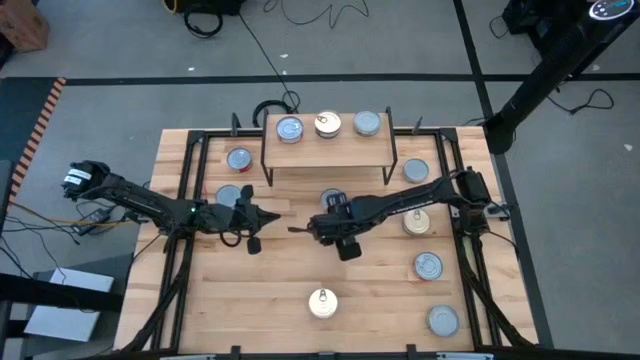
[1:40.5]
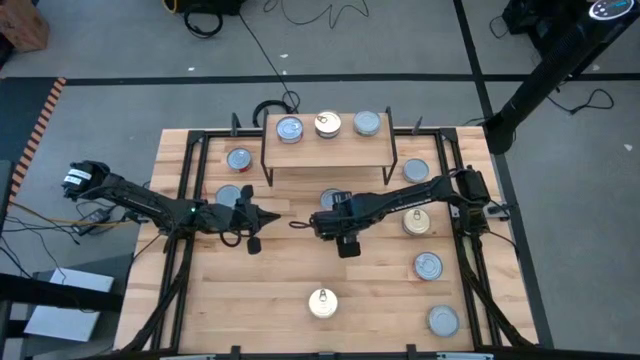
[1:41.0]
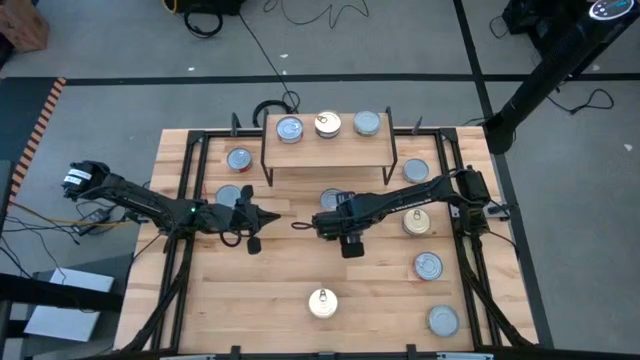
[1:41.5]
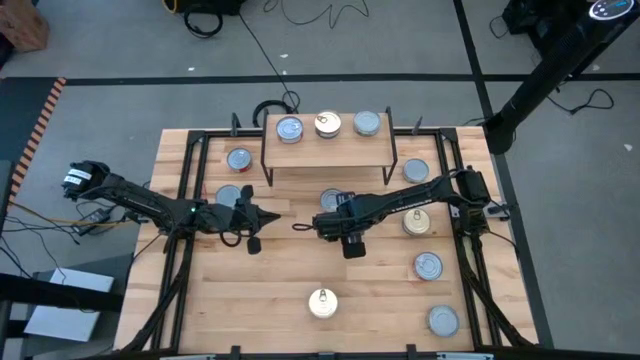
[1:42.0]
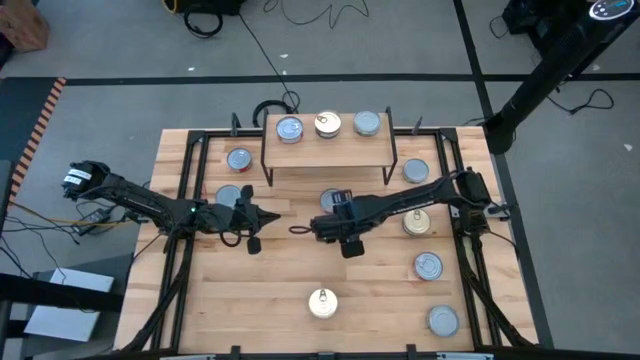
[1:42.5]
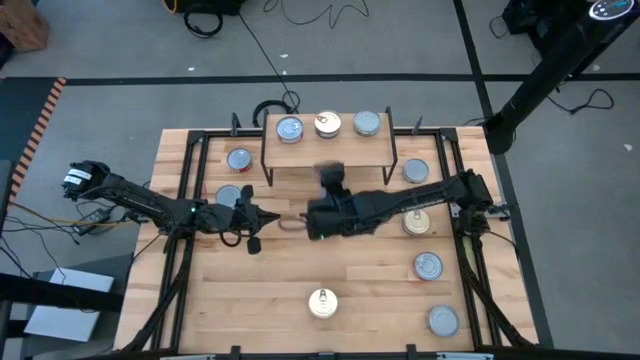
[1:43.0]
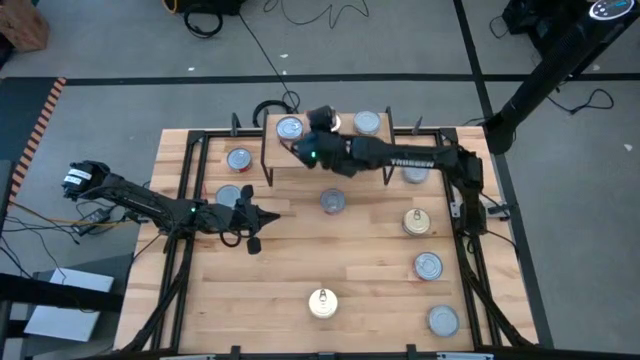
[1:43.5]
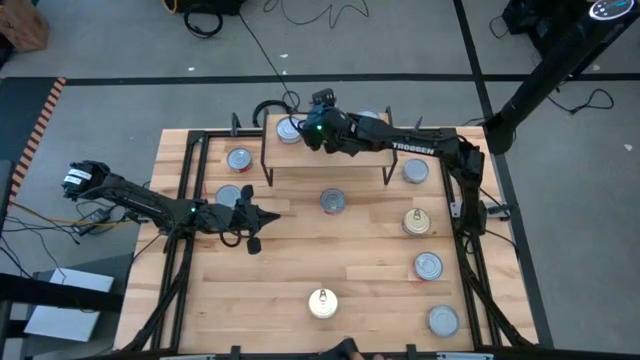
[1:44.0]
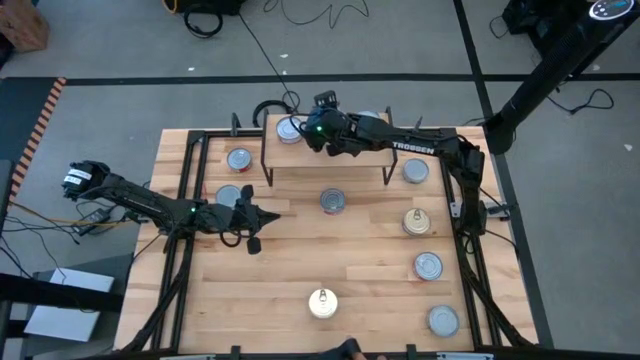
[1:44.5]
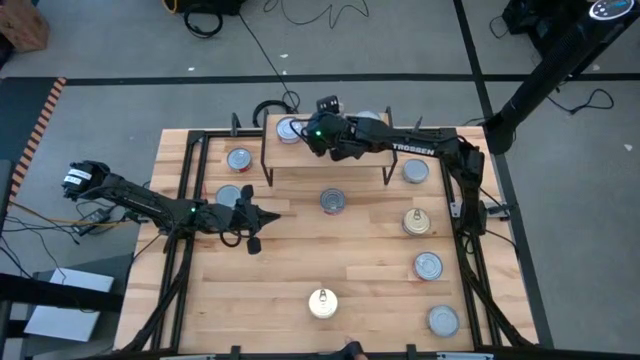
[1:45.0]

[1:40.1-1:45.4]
Task: Stack canned seafood by type on shelf
Stack the blue pink tuna can on top of the blue pink tuna can on the shelf

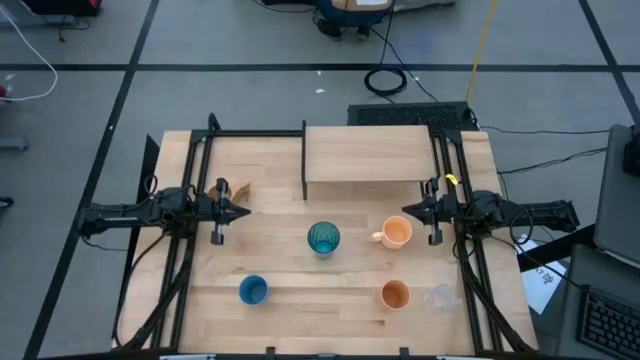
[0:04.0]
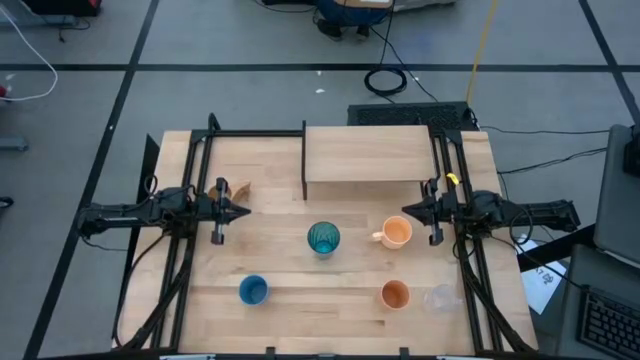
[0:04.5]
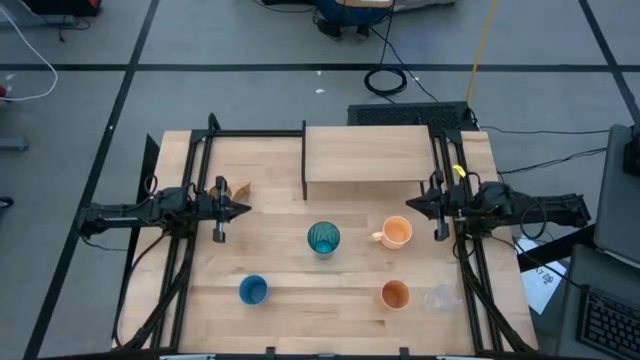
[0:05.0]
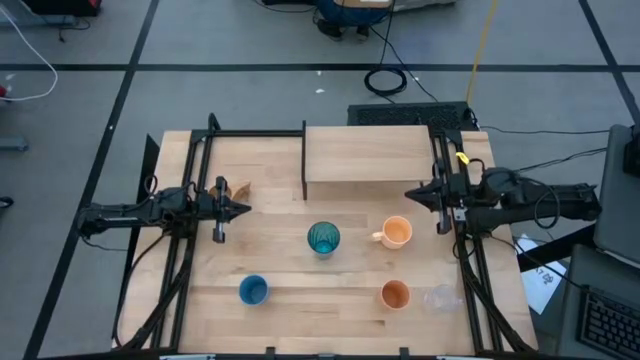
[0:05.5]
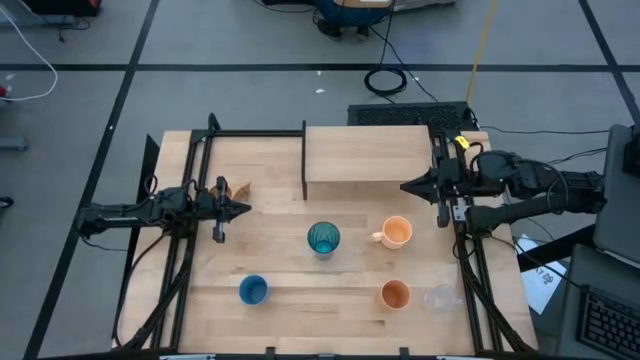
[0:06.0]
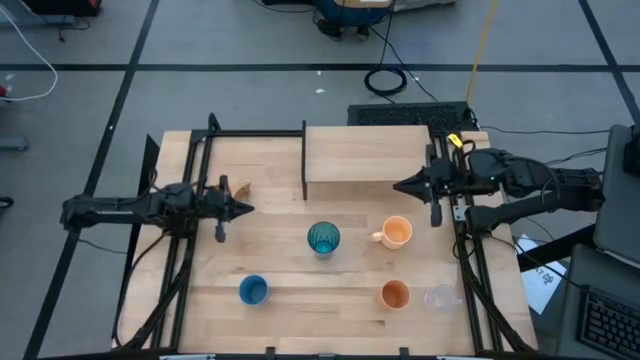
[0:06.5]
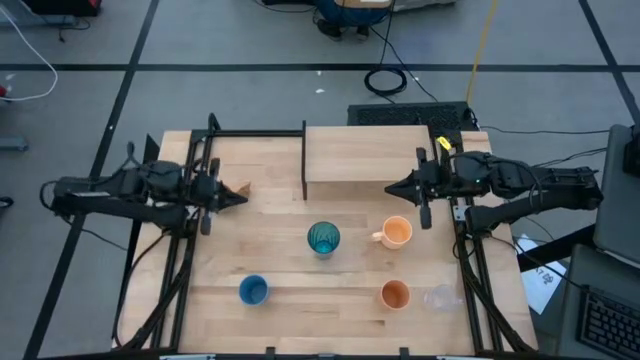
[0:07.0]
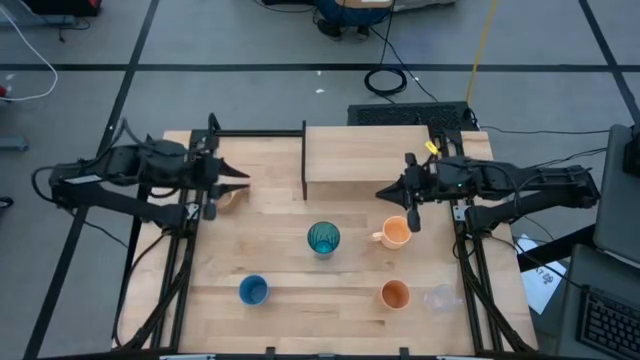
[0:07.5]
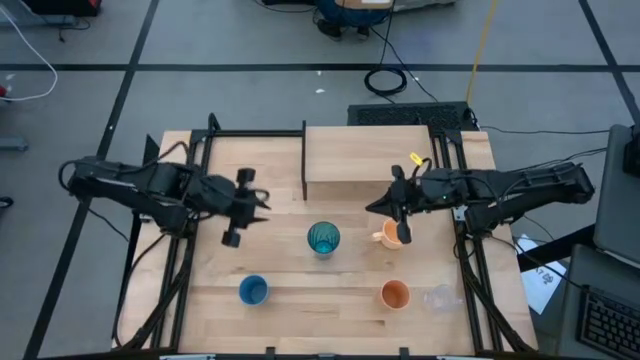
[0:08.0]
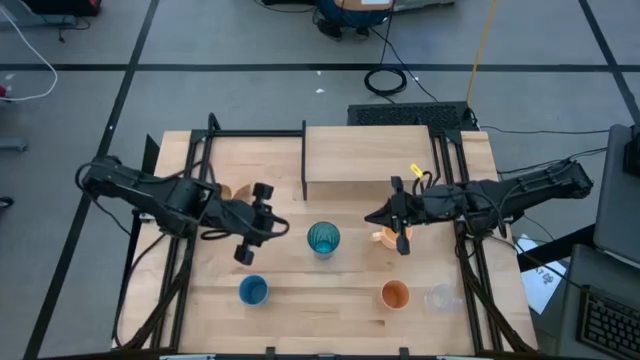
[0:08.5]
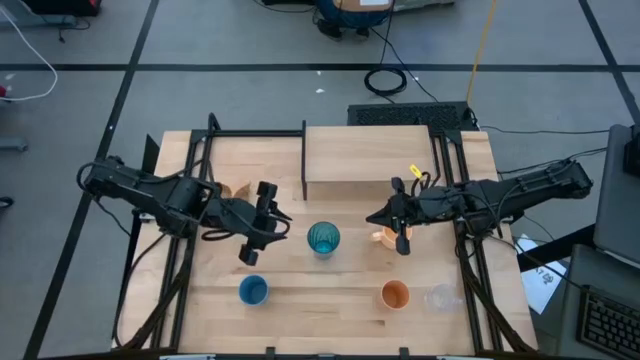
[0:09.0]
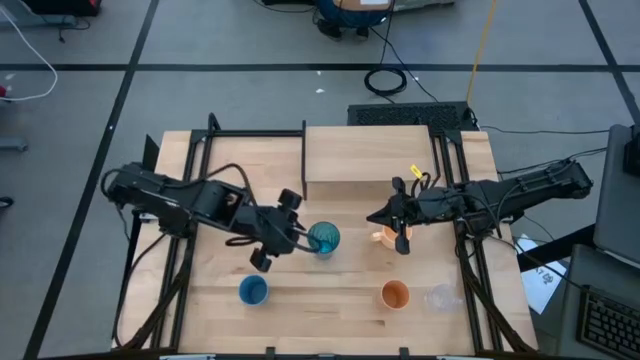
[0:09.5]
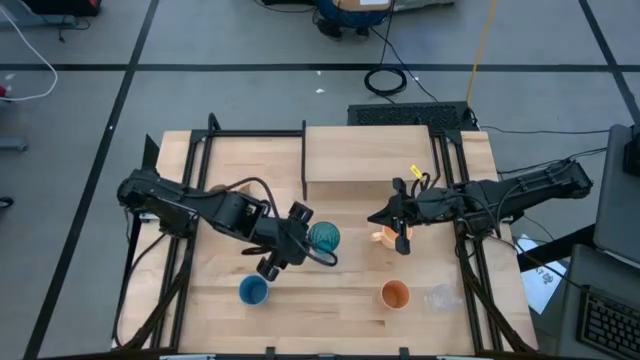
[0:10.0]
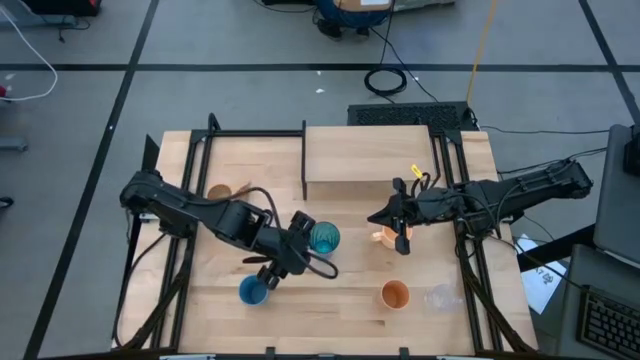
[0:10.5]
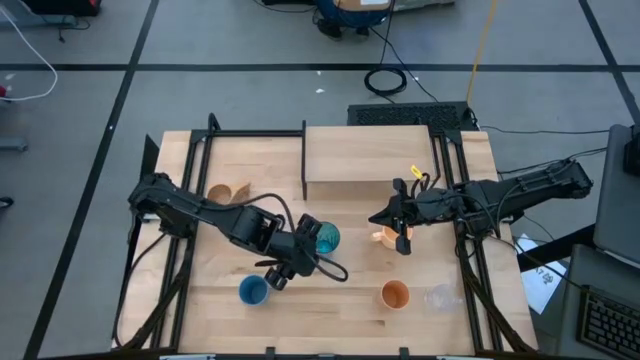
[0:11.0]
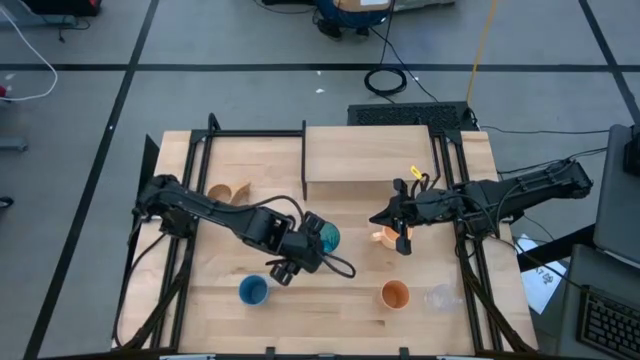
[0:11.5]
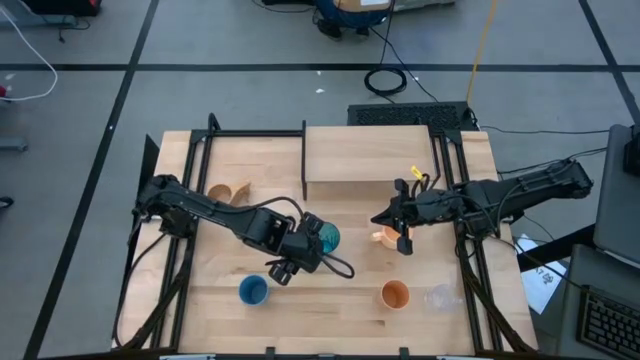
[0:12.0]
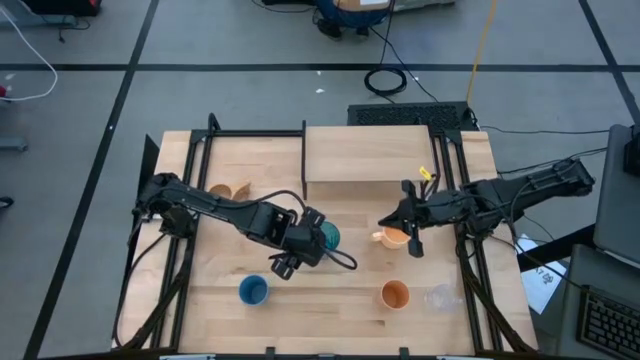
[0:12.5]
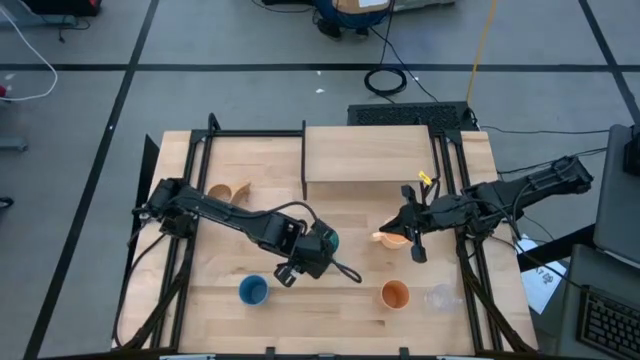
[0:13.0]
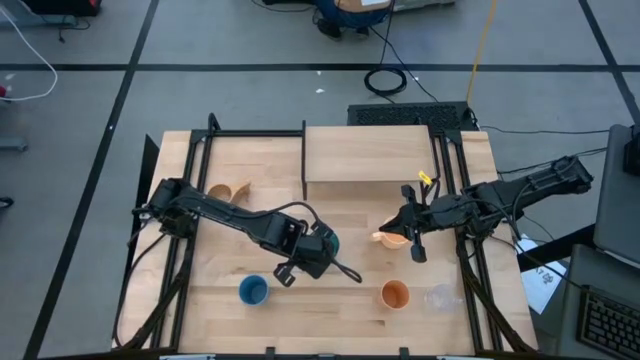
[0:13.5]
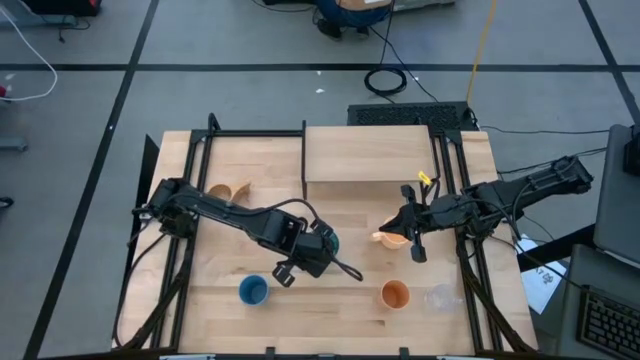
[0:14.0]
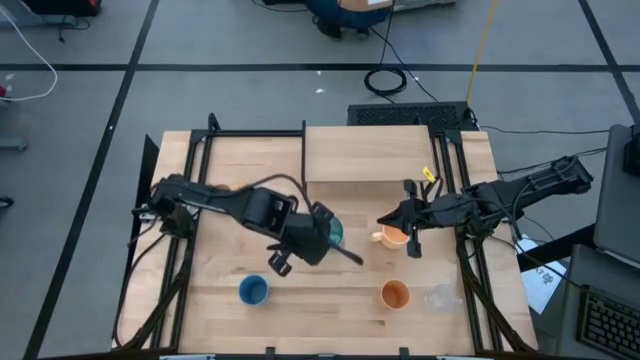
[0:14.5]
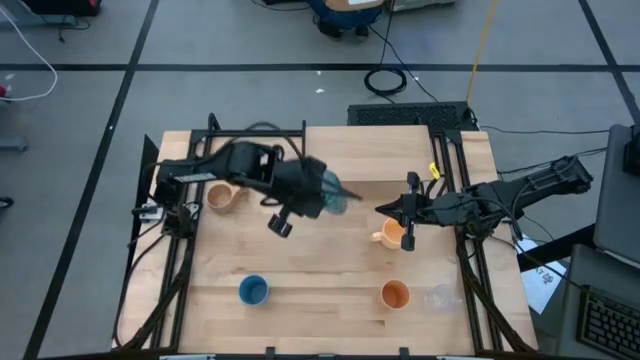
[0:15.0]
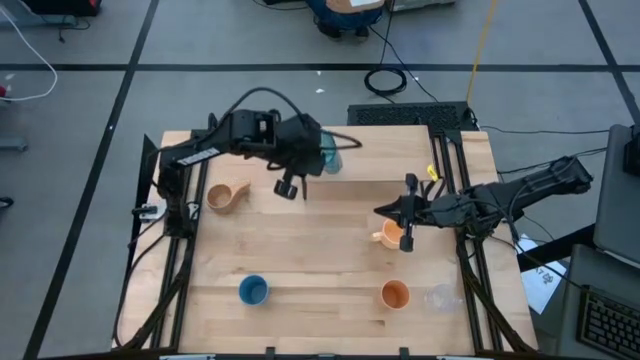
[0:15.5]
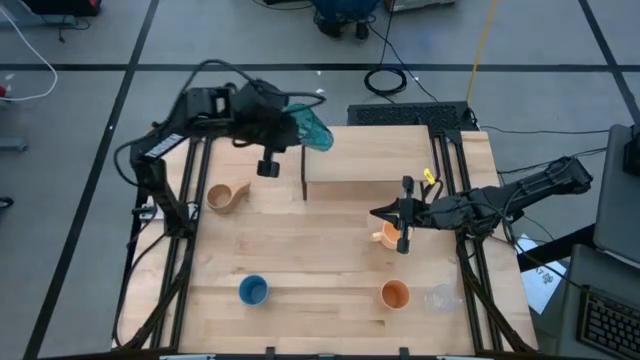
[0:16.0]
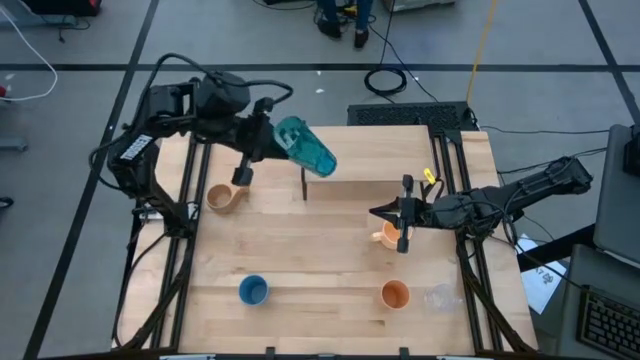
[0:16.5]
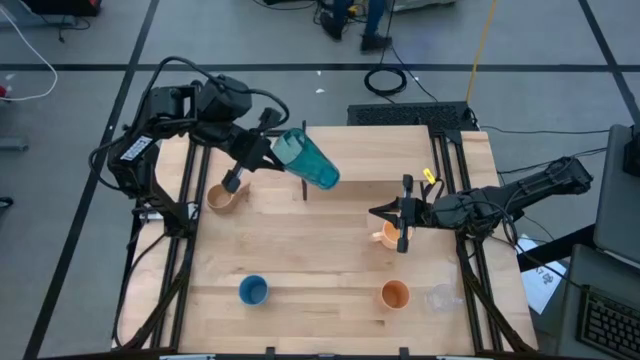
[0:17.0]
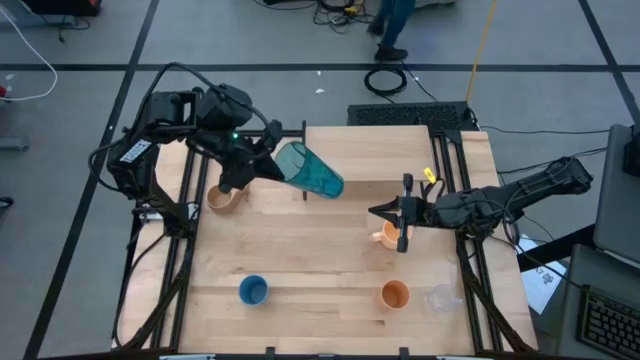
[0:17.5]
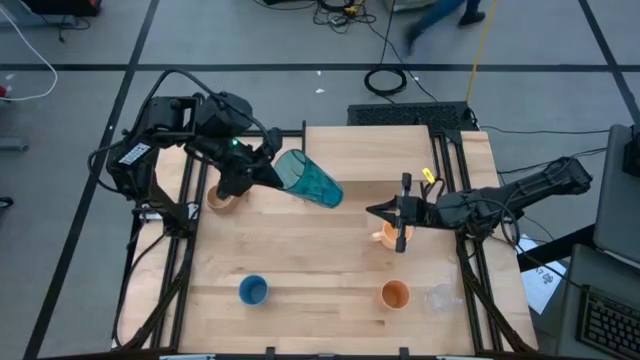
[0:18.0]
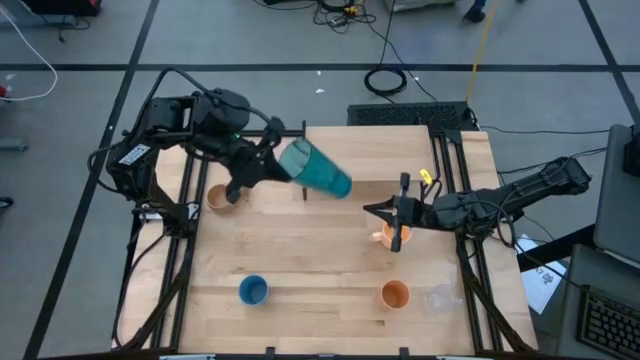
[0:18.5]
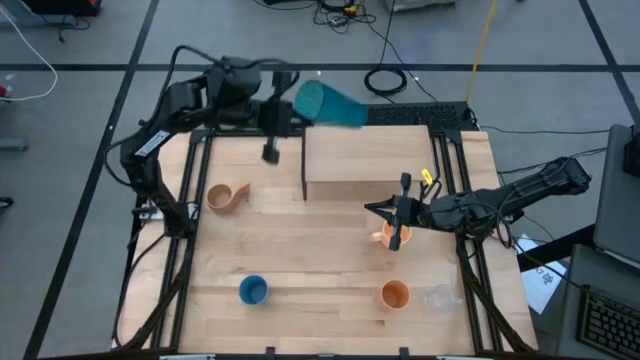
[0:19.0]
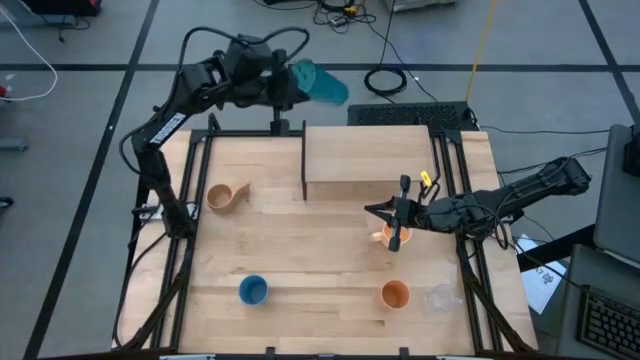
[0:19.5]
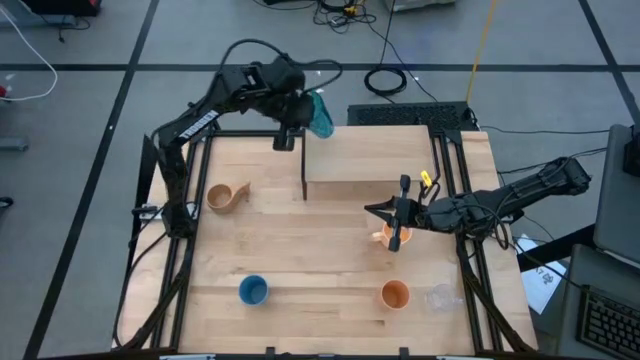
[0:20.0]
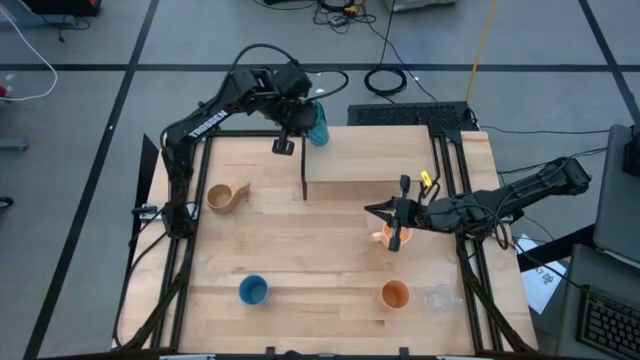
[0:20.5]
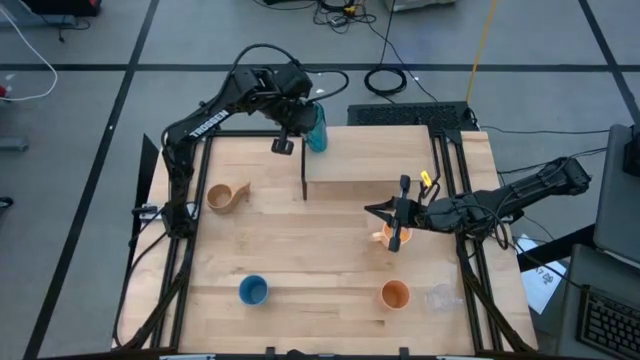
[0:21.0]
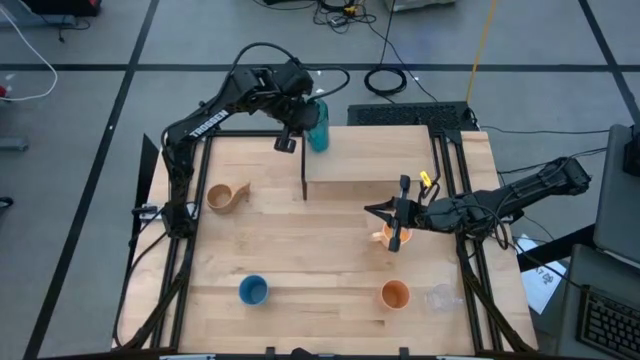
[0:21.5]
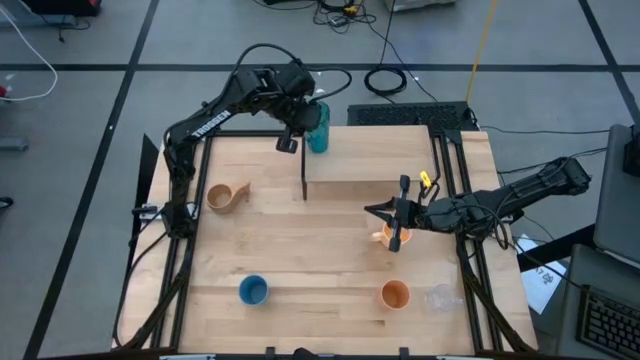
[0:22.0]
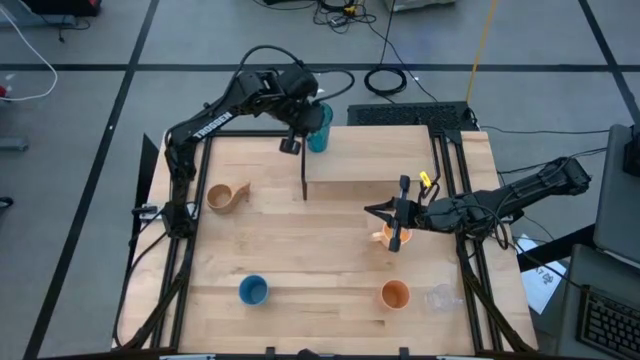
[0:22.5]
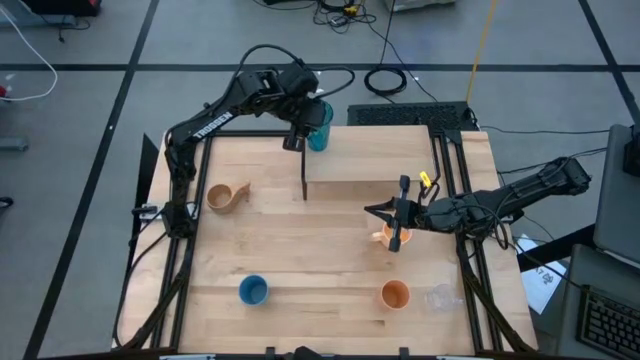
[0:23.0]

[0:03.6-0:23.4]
Task: Stack small to large cups/mugs on shelf
Put the blue cup on the shelf
